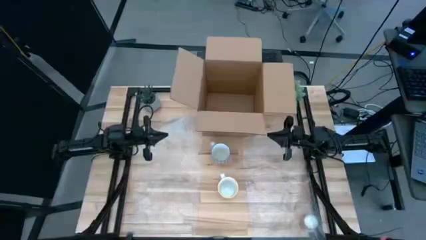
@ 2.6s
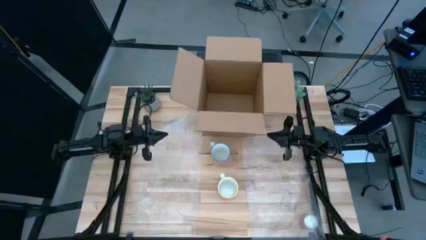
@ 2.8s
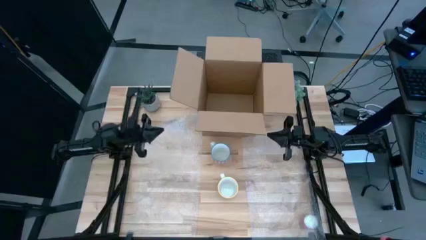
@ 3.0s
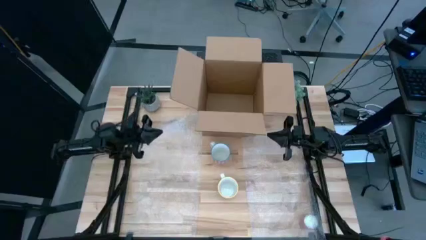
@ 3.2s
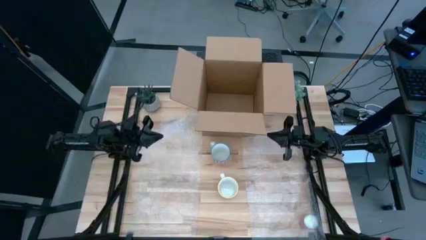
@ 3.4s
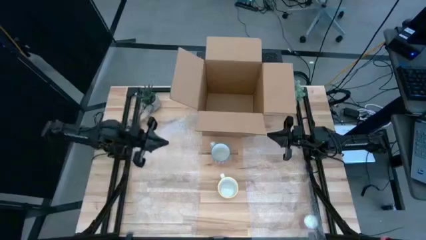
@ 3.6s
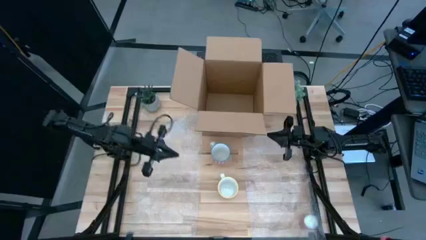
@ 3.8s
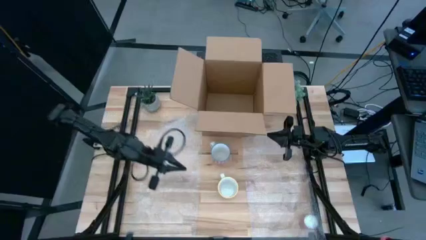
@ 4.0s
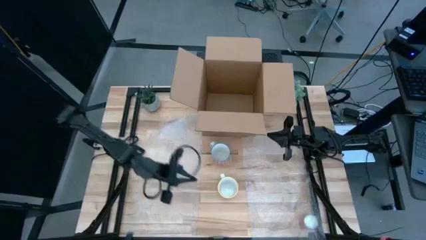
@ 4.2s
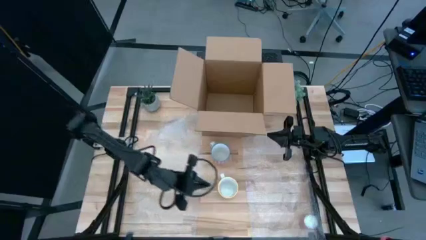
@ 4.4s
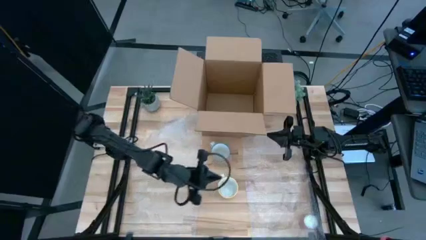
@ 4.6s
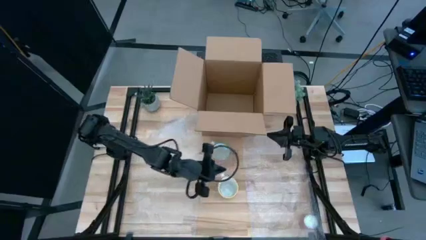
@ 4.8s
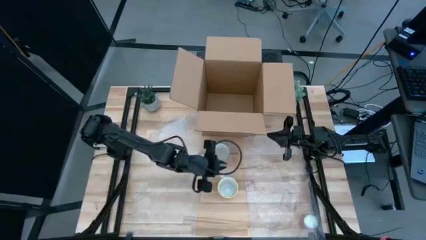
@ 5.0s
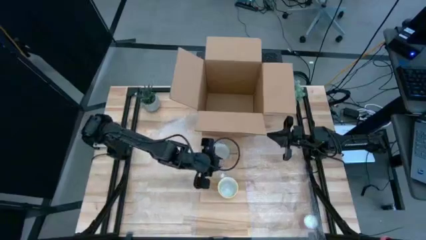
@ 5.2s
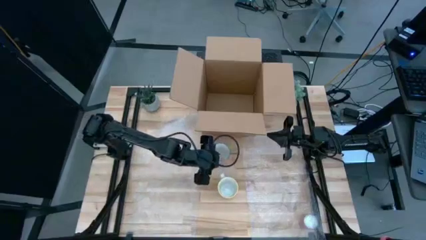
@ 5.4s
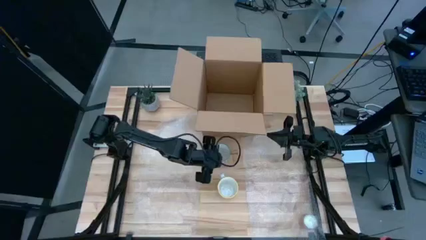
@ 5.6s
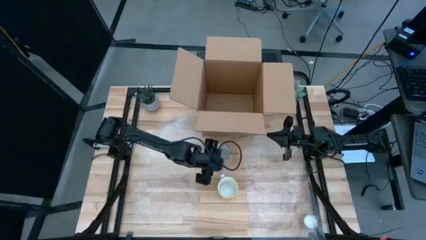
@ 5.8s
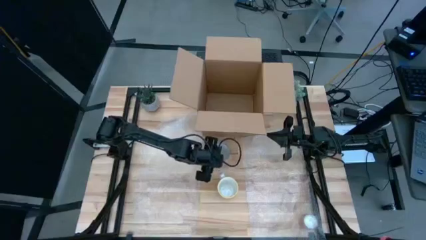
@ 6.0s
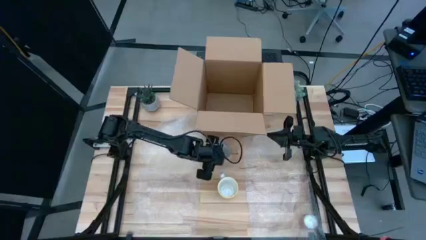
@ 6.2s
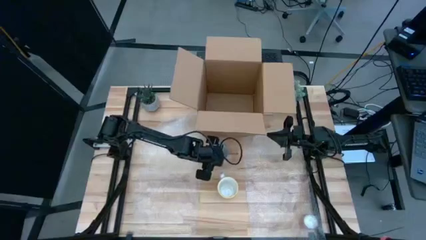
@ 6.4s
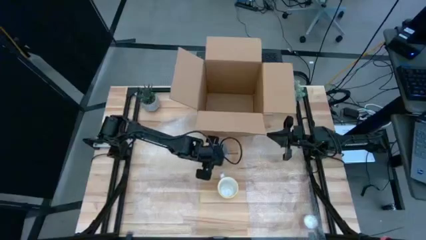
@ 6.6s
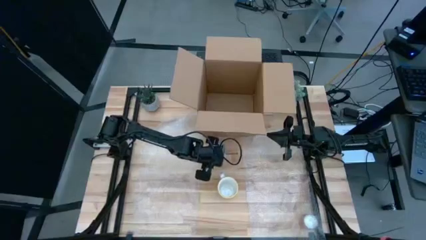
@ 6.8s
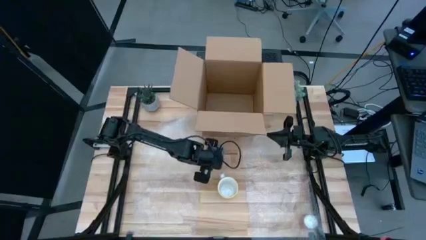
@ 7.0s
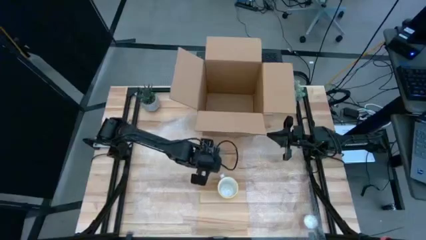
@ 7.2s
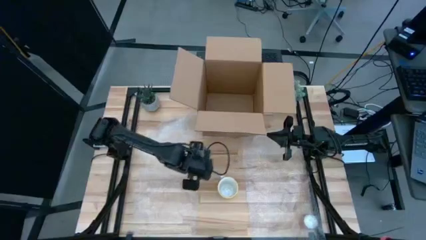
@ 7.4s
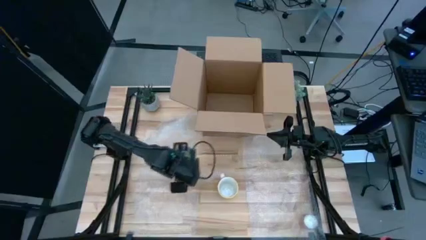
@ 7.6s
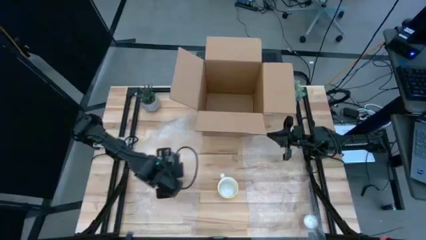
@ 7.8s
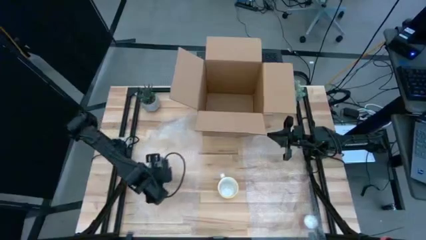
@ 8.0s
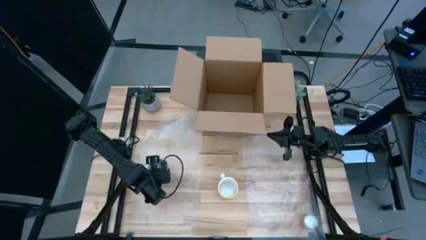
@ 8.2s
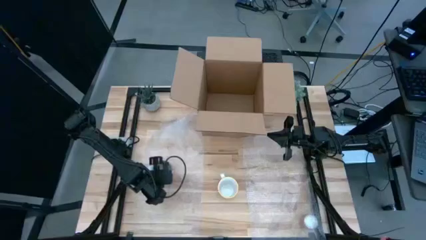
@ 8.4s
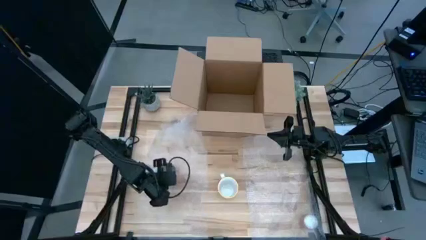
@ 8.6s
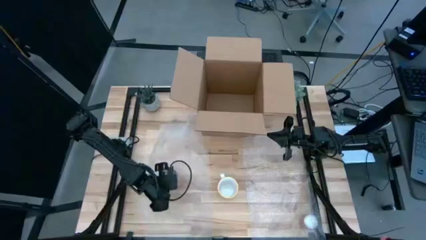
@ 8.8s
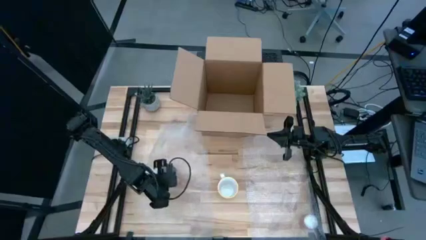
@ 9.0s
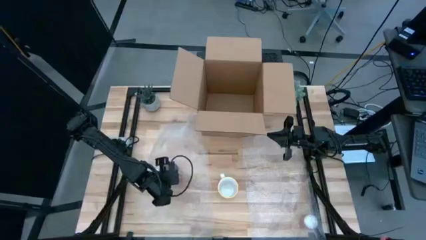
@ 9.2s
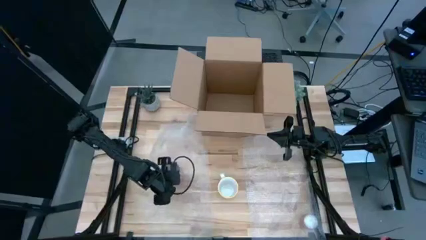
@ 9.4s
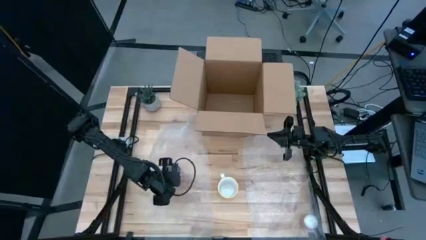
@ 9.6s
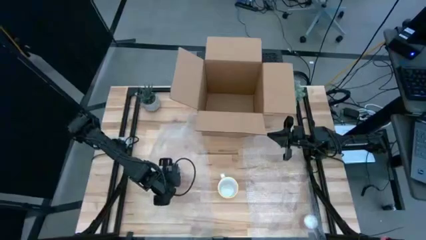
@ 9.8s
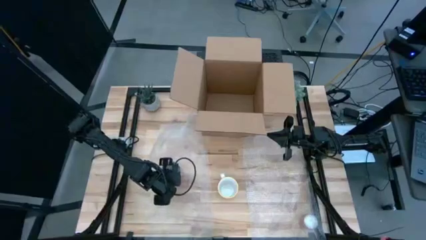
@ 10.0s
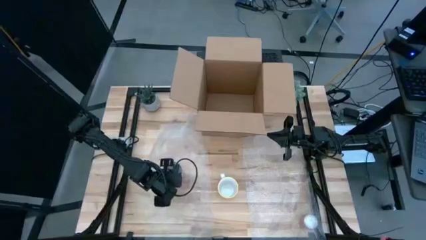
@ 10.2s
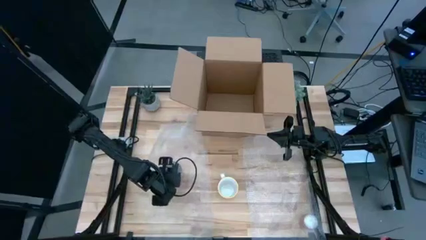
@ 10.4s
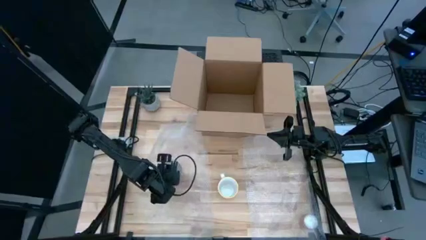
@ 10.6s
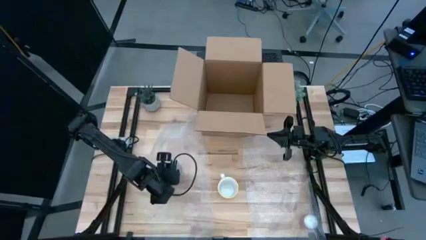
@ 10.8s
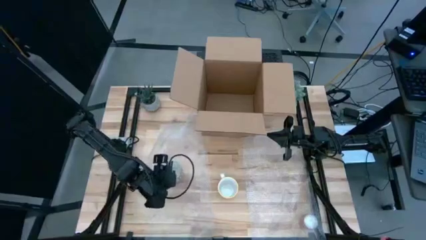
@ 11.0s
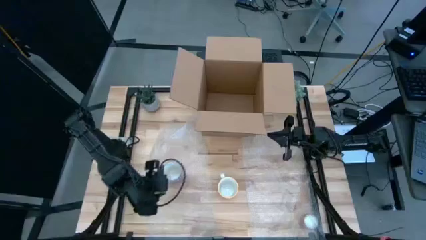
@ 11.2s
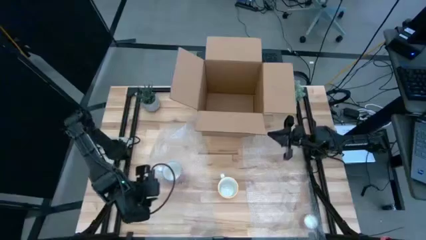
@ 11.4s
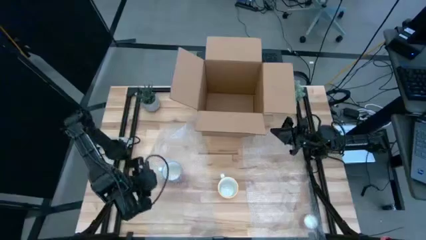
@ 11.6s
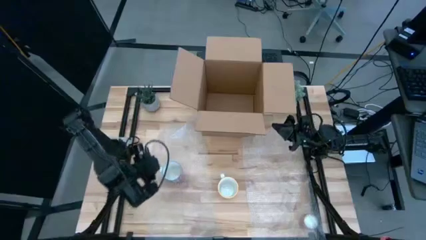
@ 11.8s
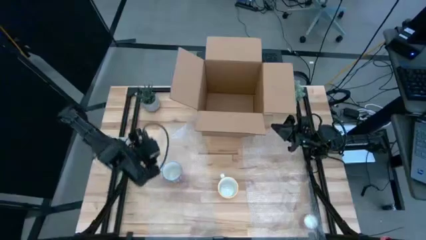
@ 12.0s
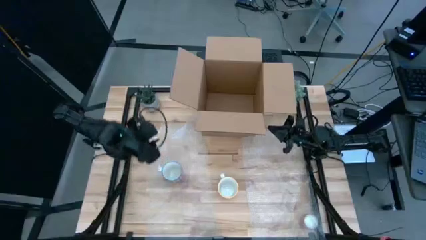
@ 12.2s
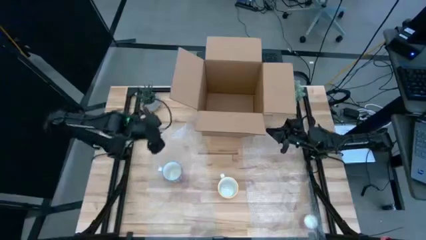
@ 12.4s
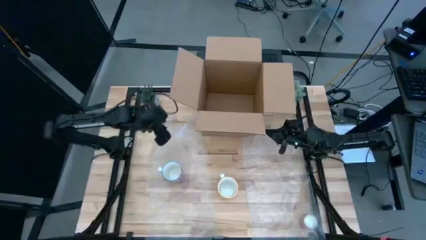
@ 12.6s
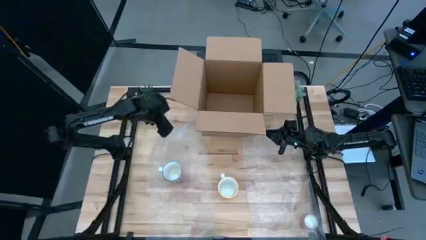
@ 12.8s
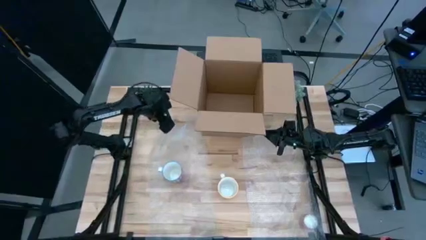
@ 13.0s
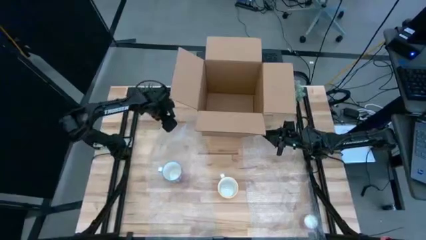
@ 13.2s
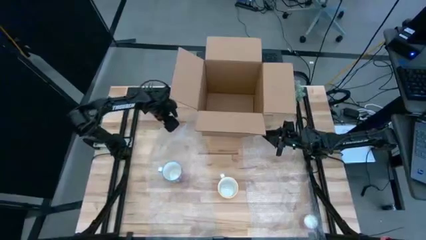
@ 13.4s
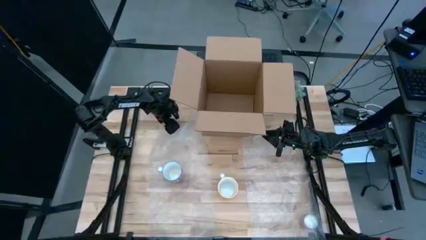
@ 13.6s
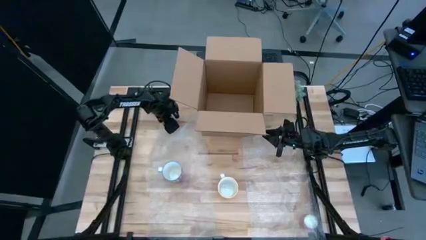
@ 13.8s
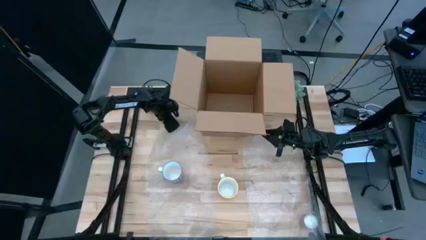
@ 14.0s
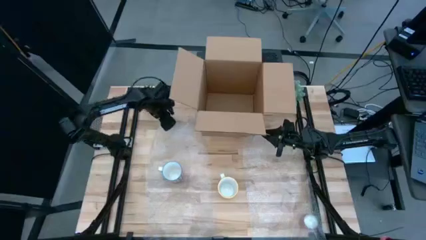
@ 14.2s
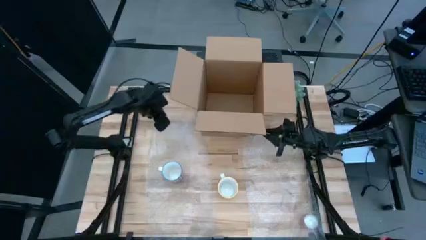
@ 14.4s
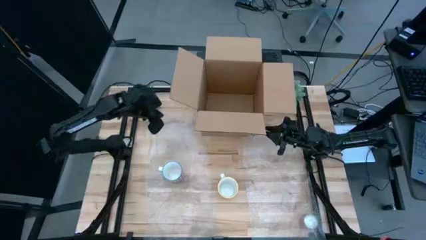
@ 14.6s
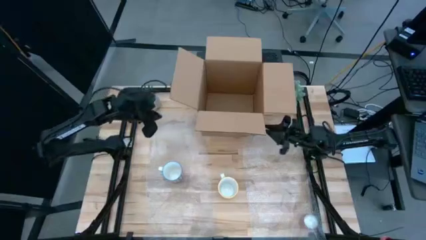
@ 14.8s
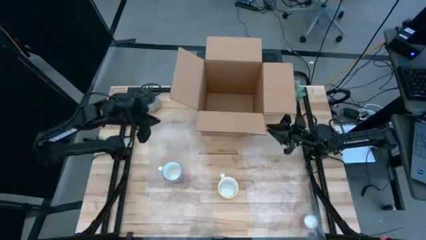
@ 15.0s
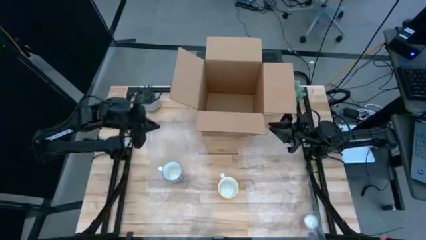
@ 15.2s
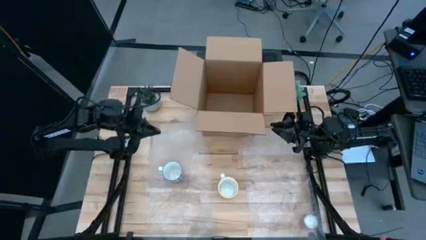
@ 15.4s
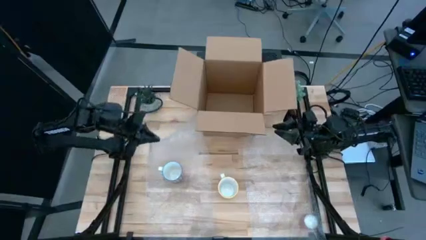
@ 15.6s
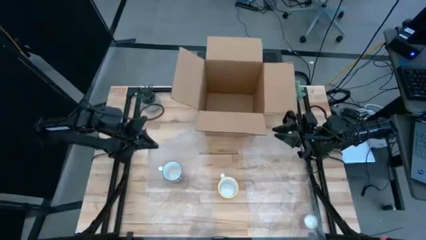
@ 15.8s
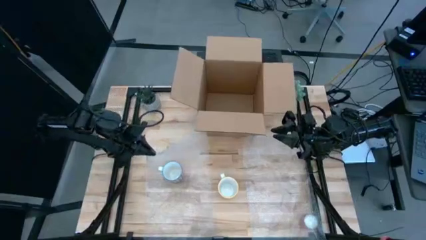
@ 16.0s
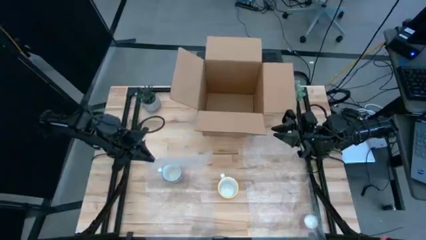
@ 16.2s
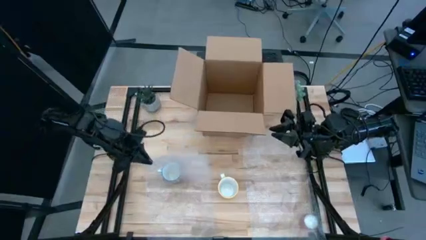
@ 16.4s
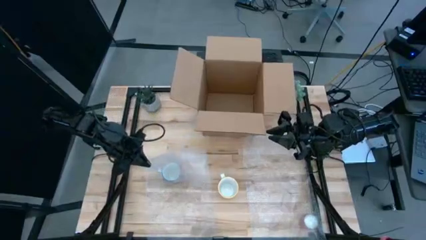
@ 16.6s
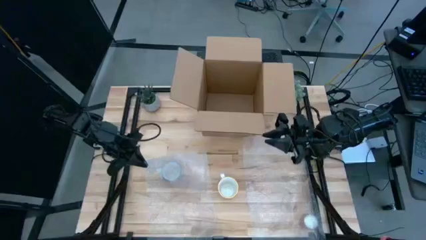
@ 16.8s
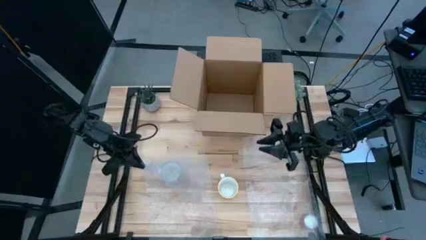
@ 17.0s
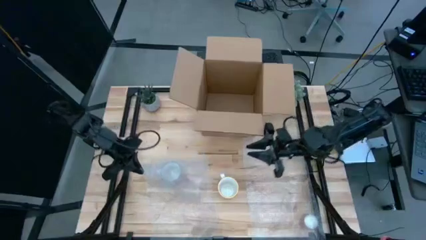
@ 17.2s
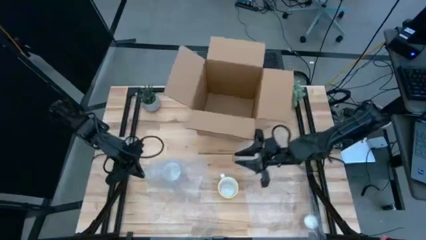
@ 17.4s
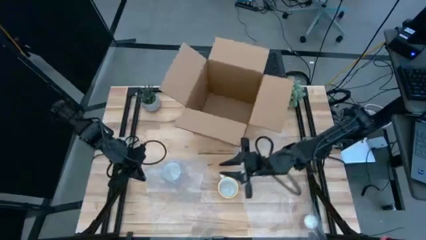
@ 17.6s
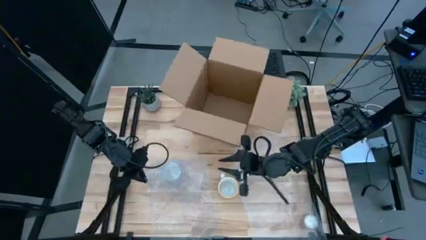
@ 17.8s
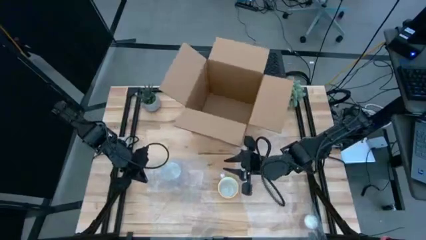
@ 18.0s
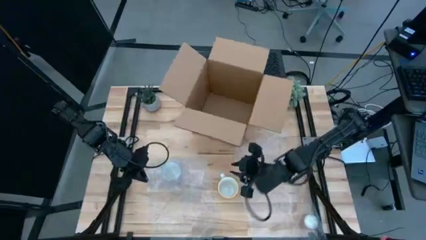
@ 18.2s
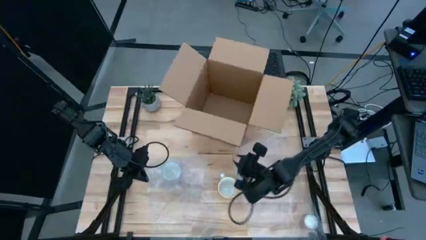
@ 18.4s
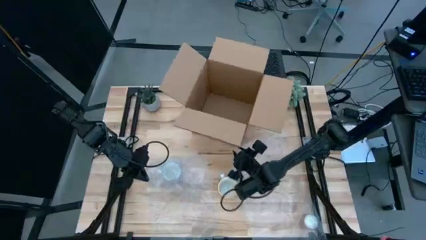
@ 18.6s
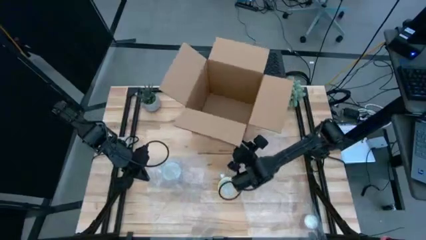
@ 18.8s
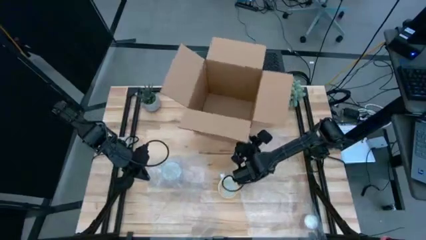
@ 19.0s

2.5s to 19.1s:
Task: wrap mug
Wrap the red mug with the bubble wrap
